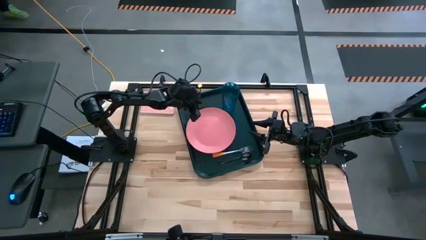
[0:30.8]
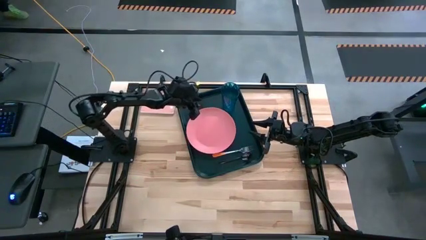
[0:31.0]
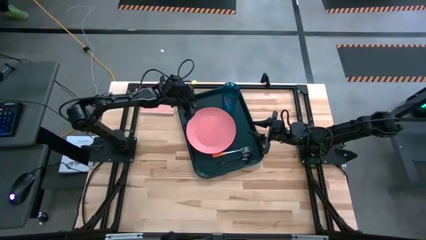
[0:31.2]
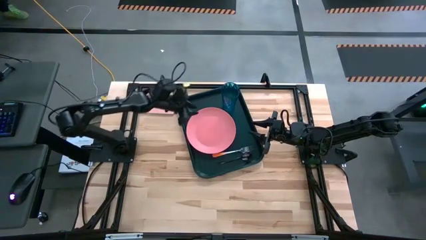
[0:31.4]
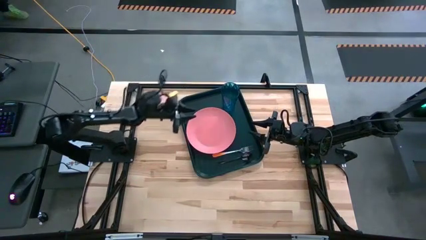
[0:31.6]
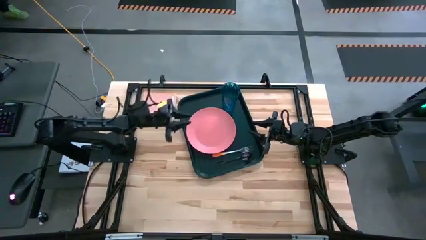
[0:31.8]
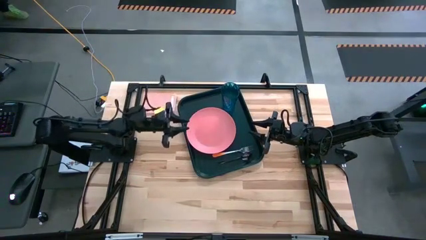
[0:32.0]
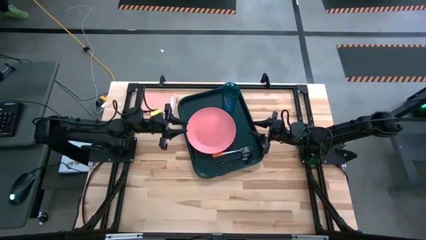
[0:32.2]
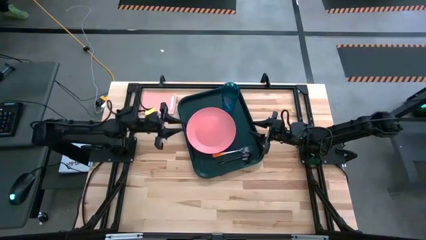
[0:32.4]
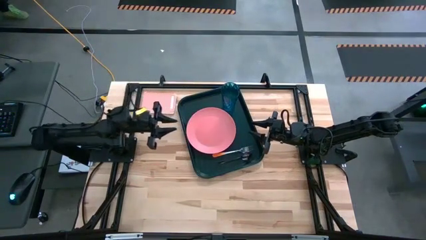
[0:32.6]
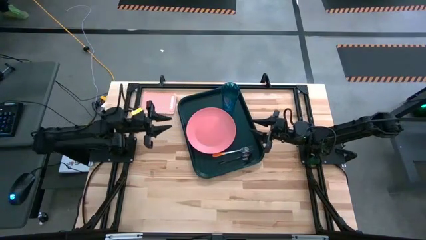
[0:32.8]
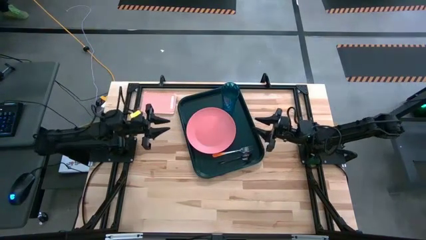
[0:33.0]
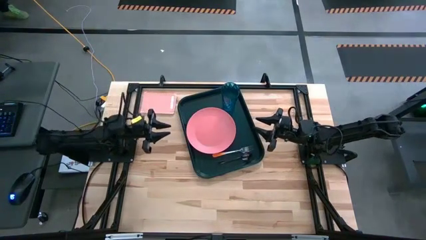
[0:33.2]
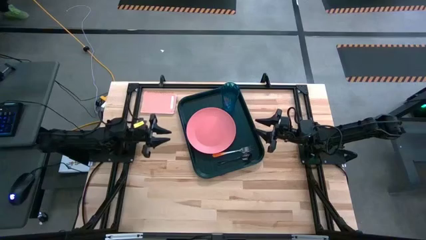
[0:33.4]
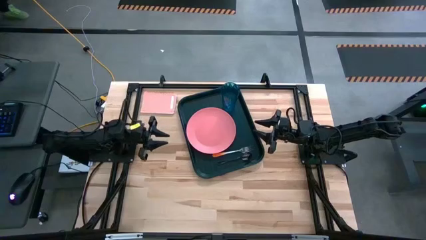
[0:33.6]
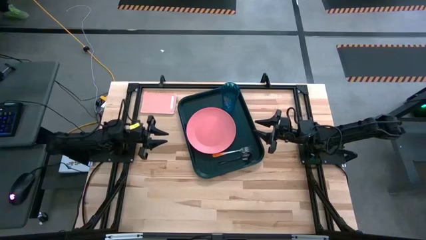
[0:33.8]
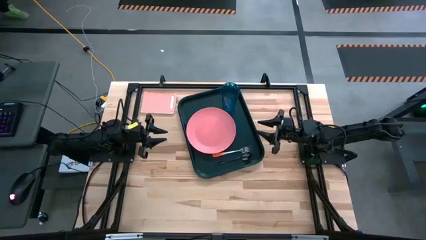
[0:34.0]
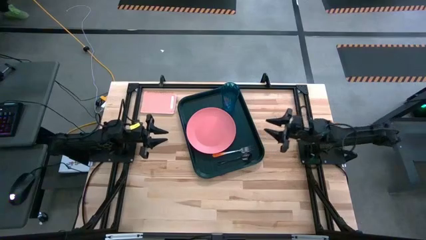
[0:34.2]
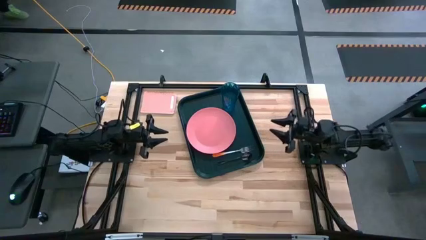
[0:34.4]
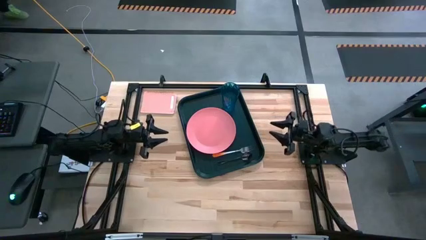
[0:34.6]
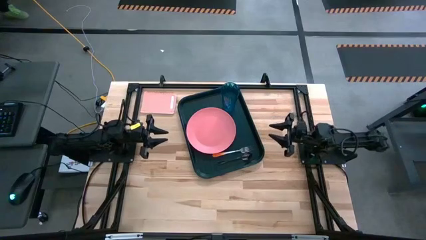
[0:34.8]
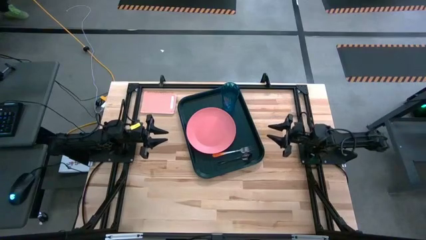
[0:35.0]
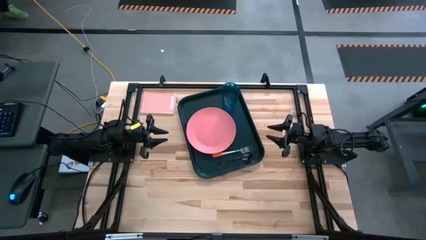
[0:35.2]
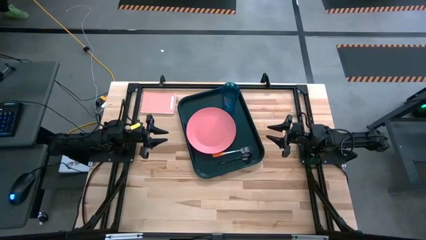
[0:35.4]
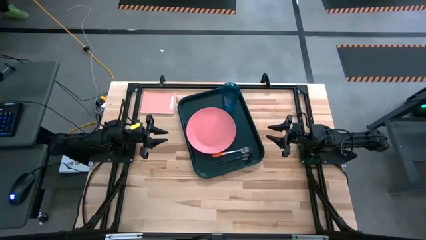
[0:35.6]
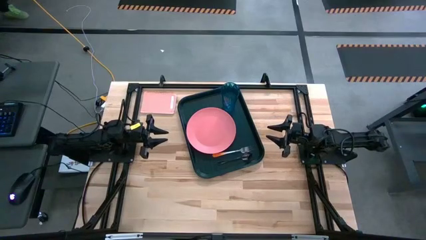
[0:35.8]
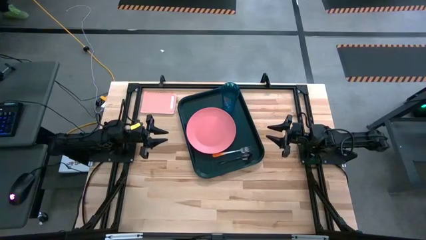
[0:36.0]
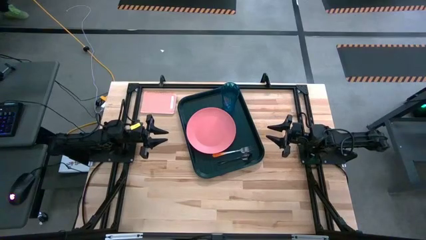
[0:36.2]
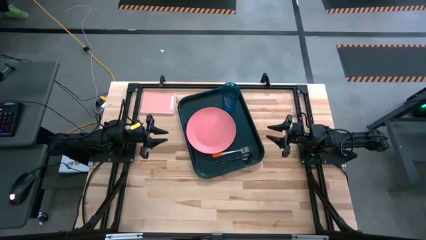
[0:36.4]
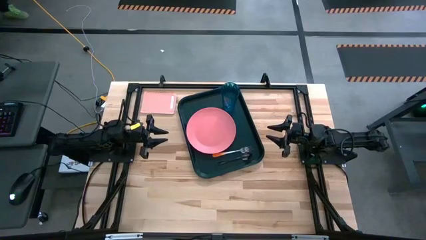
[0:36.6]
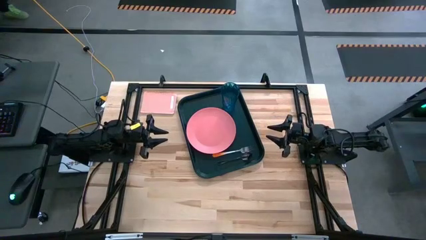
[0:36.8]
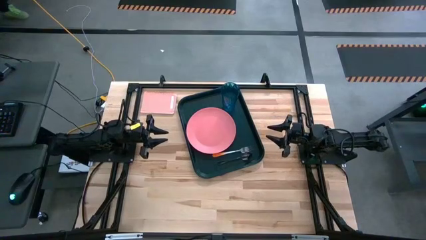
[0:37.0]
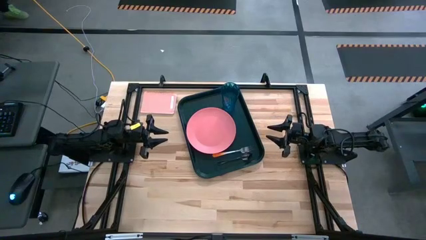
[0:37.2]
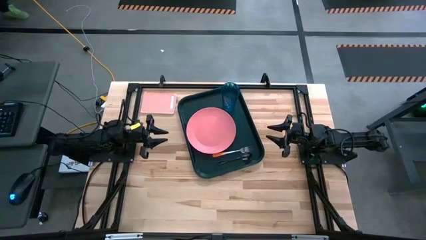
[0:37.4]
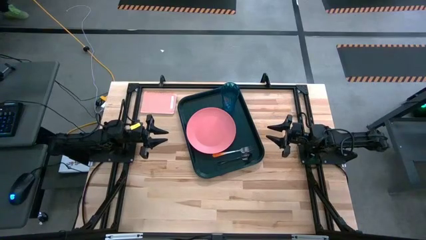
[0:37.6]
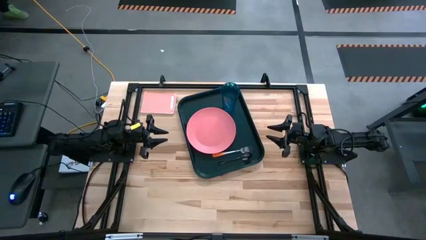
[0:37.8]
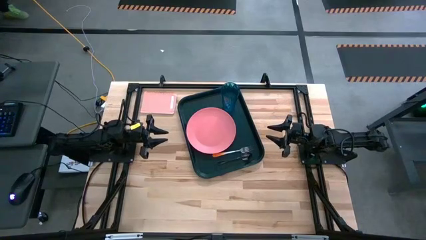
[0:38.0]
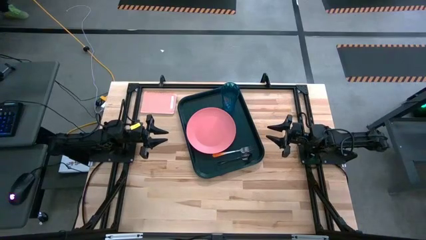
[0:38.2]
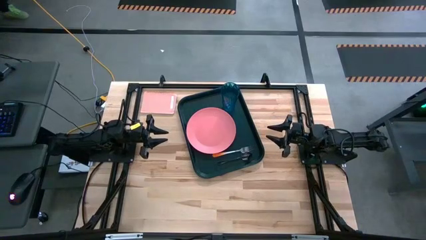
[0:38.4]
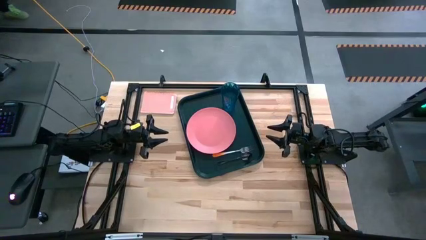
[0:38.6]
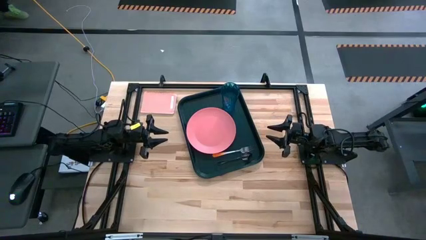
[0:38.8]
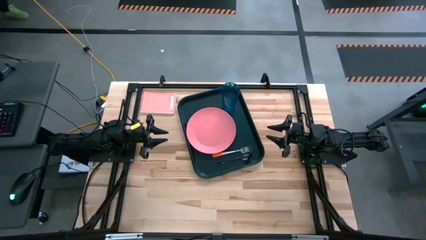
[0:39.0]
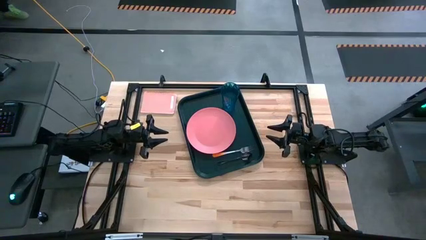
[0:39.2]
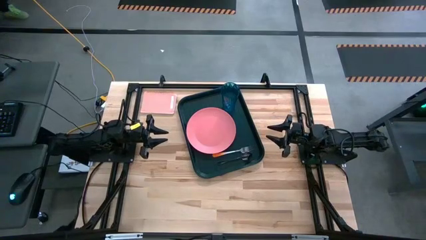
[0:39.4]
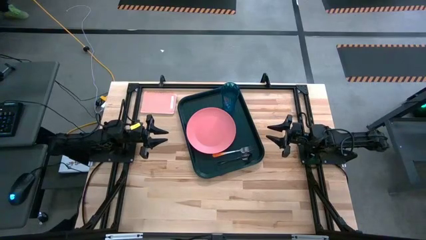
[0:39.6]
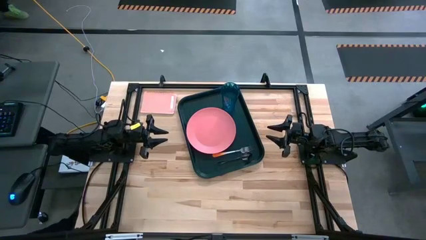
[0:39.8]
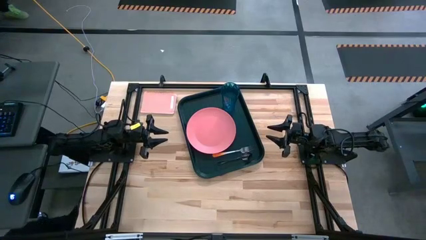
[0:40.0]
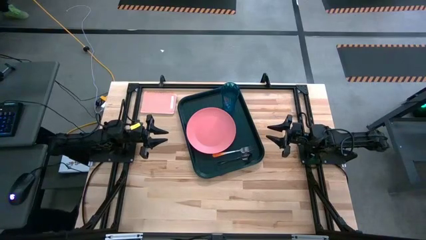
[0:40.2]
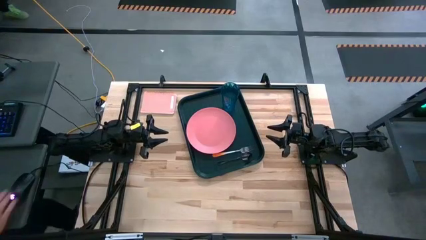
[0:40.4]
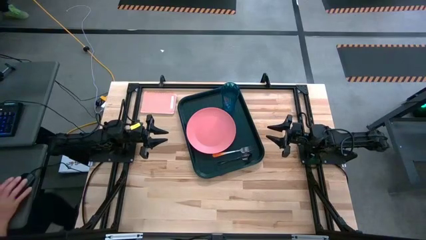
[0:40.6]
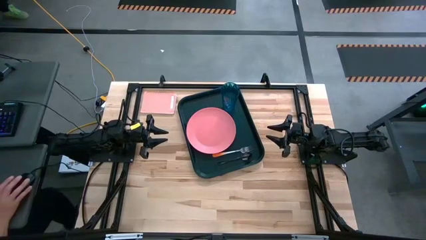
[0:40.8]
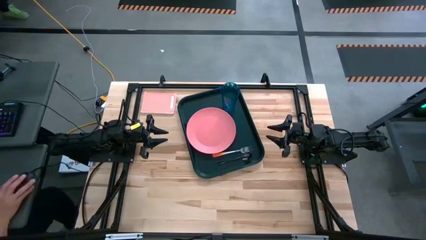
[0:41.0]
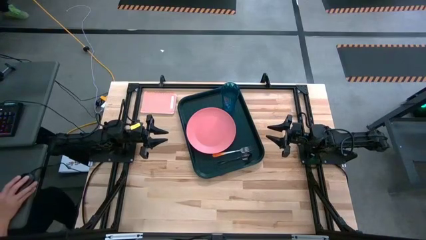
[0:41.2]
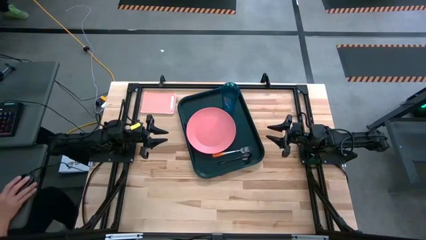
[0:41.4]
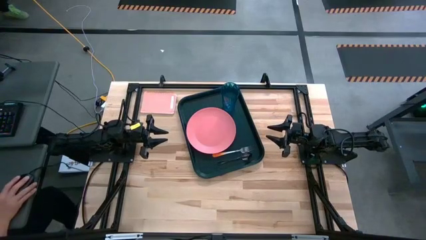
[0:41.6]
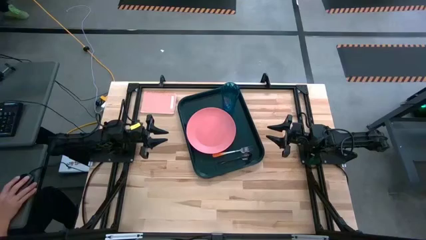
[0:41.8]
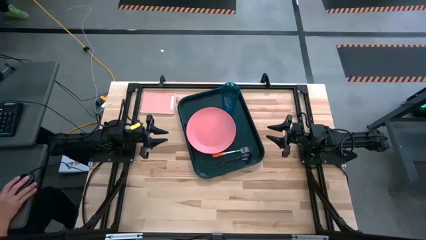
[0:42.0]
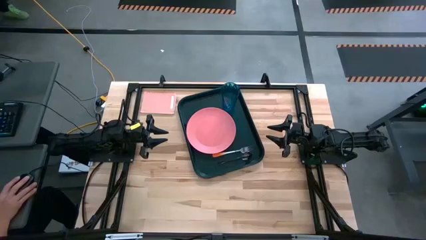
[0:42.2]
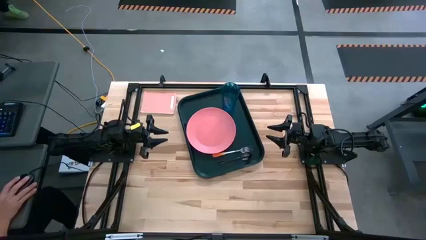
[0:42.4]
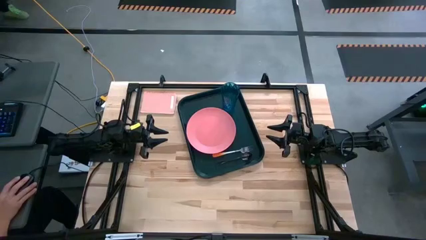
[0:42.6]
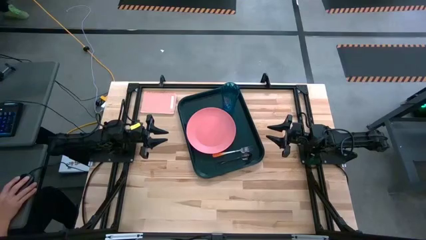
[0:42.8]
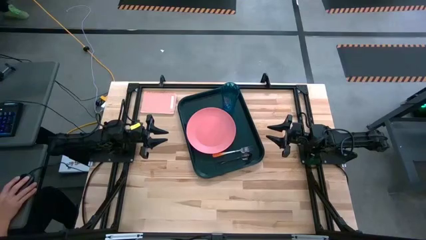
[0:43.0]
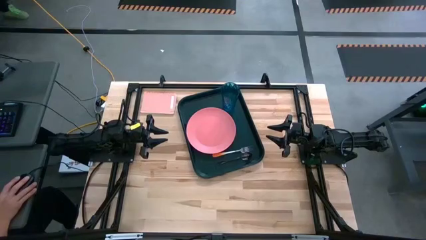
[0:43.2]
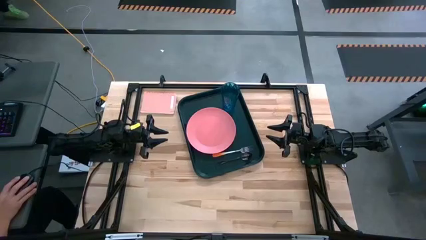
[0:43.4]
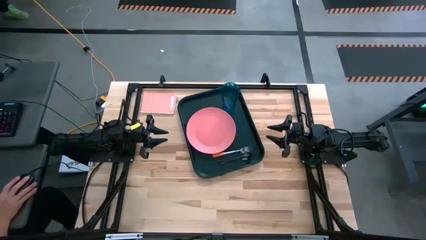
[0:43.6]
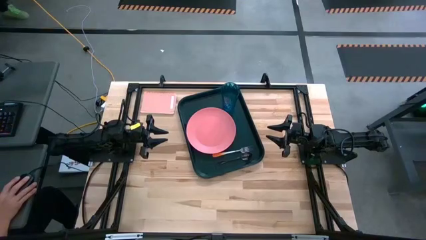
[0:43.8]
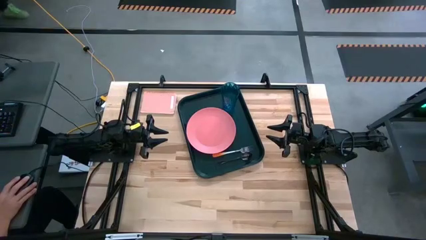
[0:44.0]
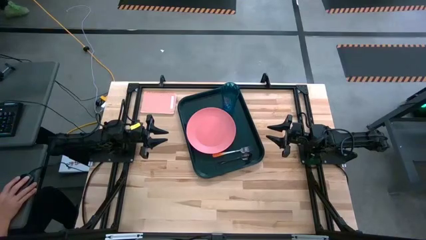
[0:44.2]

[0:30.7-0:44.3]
Task: Pick and place plate/cup/fork/spoon on tray
Return to Home Position

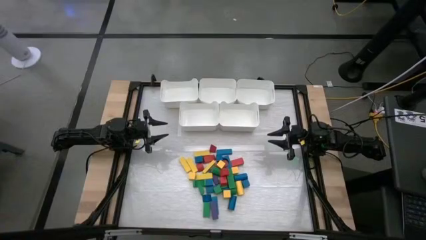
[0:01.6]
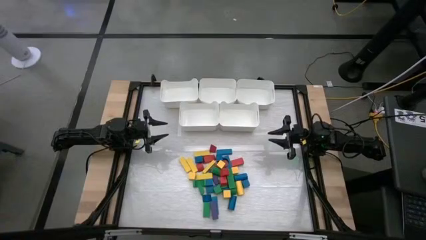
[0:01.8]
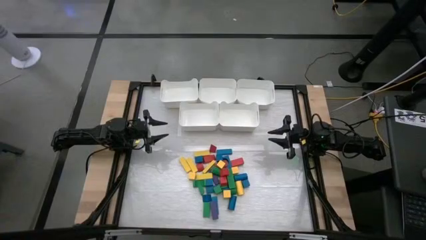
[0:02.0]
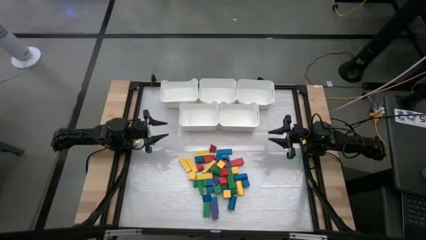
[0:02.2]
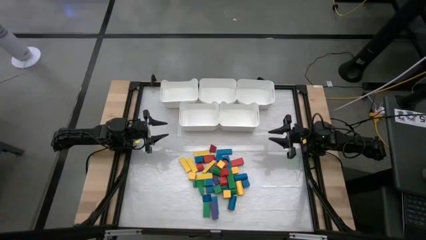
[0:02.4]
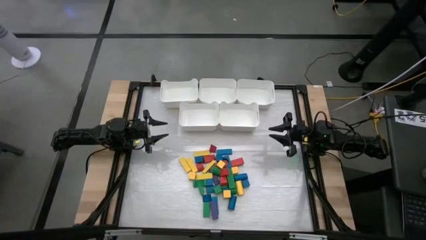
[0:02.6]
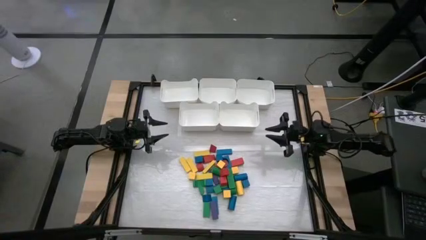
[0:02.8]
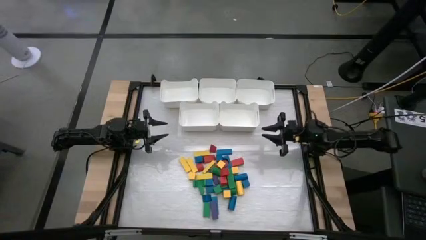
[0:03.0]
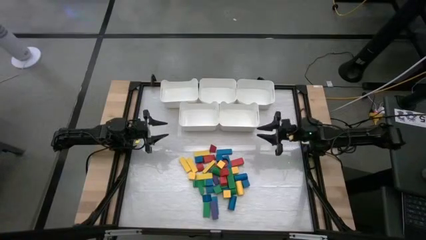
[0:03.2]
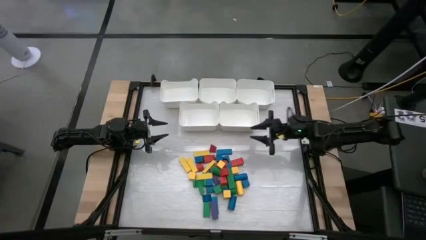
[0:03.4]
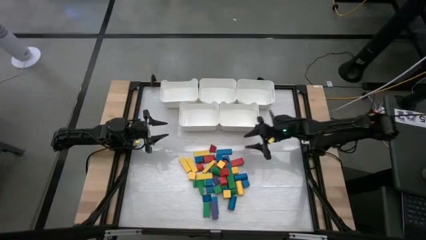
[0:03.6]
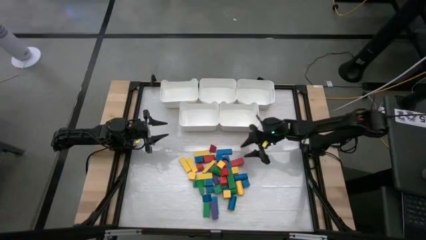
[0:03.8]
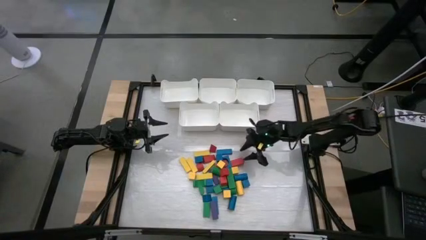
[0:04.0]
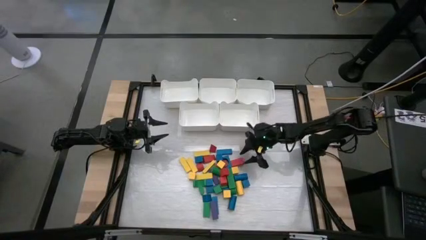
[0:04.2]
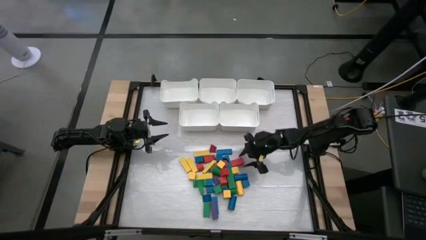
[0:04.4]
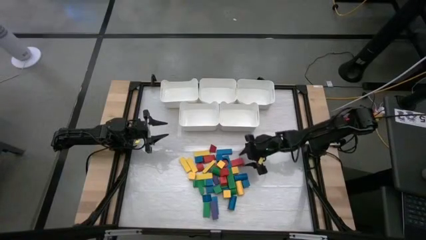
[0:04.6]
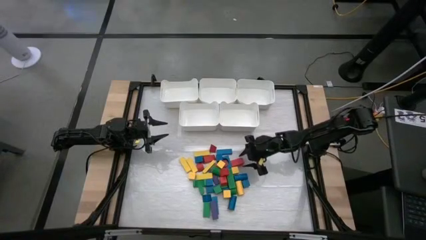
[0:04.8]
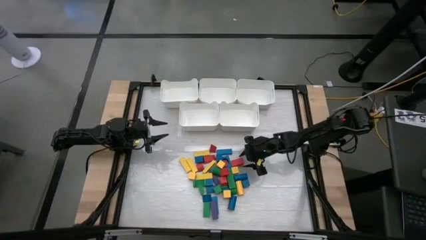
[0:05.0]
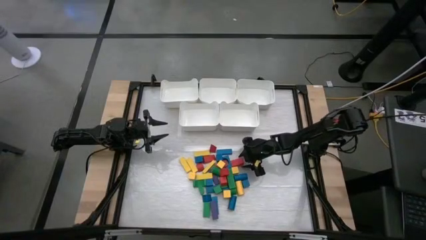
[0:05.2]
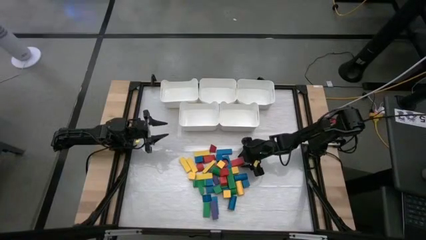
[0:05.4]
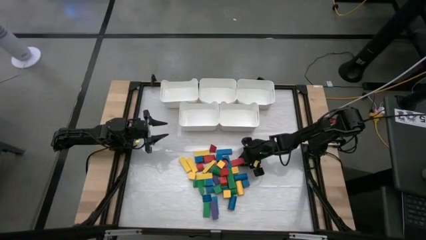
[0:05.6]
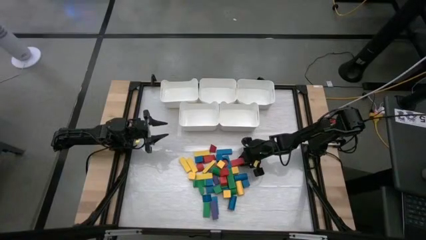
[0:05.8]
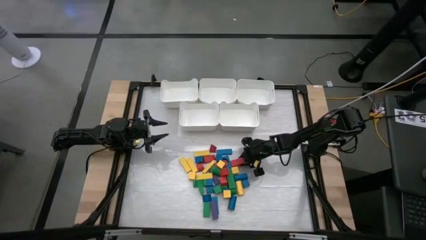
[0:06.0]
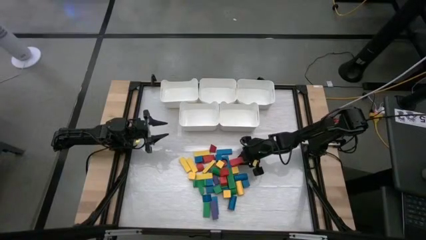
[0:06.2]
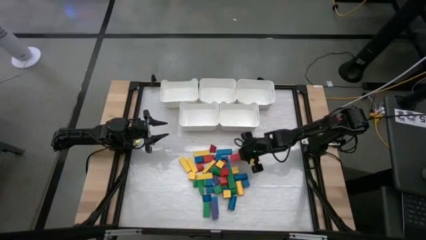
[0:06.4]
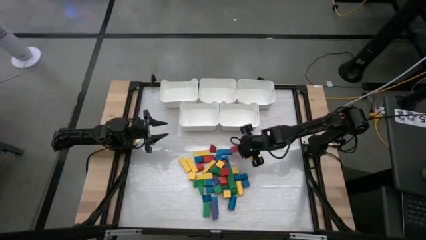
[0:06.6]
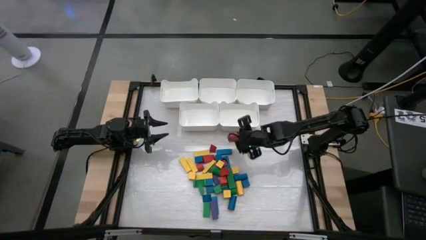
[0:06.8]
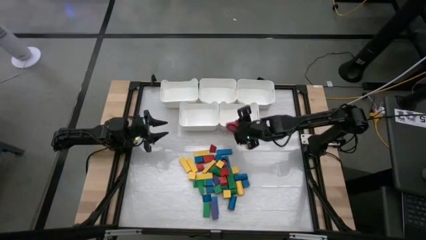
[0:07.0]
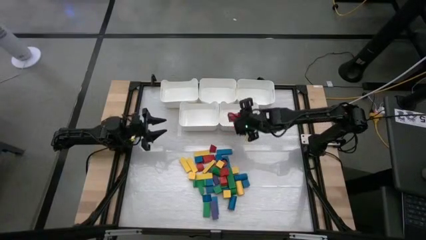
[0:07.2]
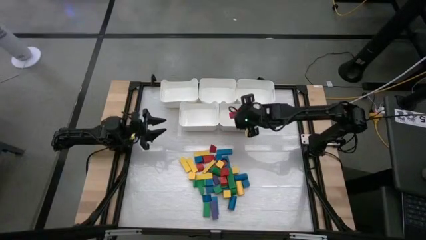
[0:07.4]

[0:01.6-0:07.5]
Task: Sort blocks
Put the red block into the bottom right bin
